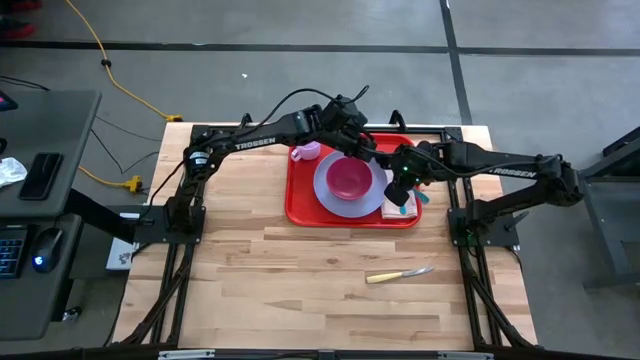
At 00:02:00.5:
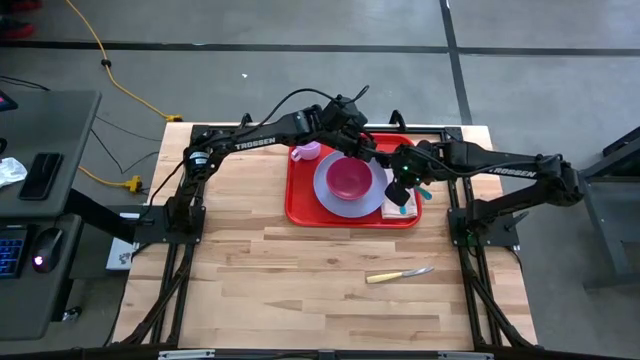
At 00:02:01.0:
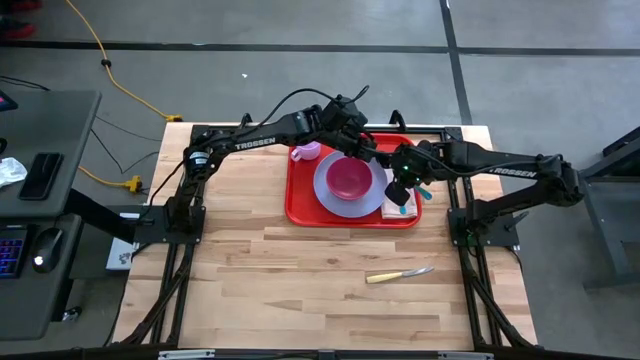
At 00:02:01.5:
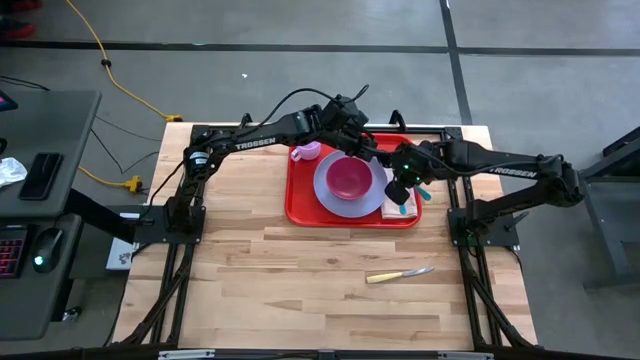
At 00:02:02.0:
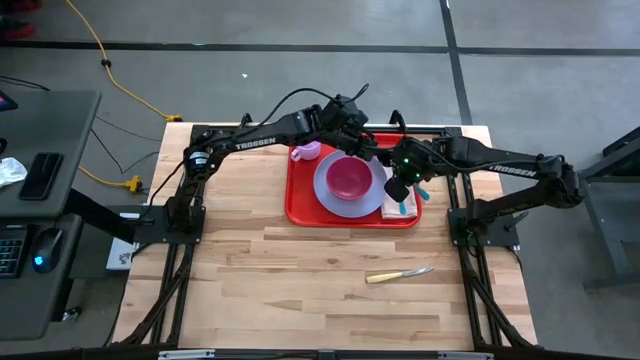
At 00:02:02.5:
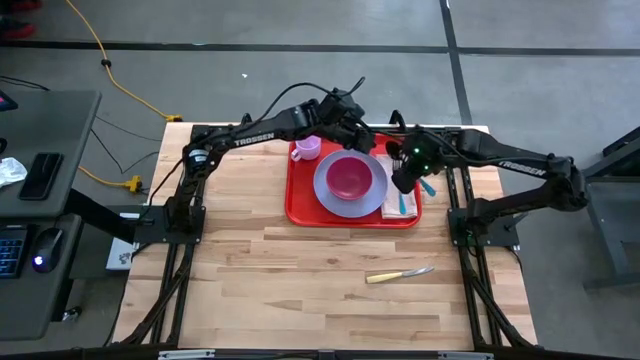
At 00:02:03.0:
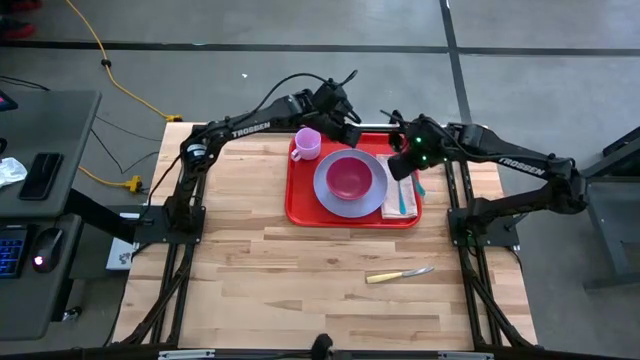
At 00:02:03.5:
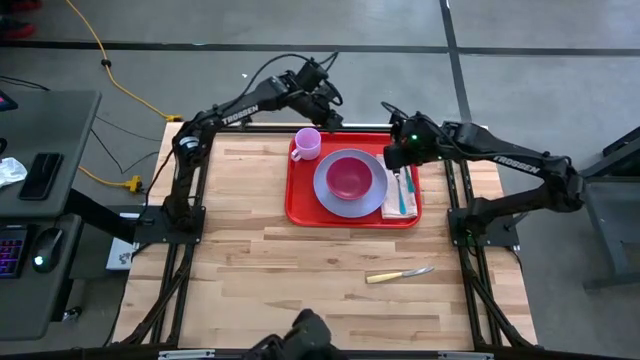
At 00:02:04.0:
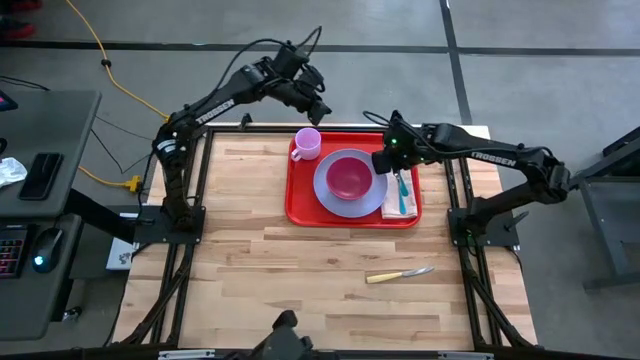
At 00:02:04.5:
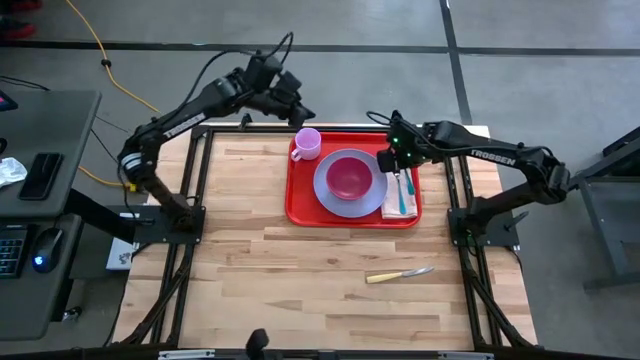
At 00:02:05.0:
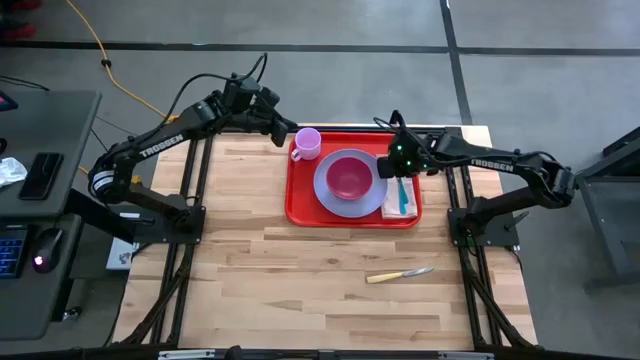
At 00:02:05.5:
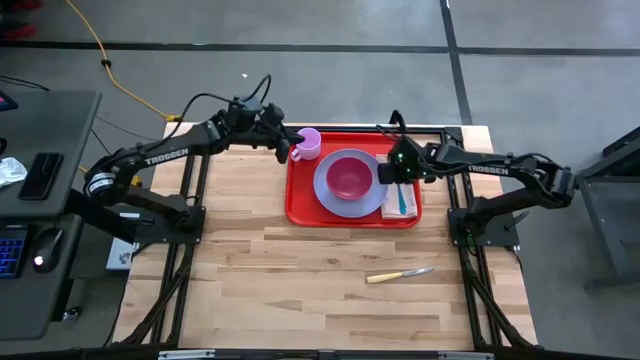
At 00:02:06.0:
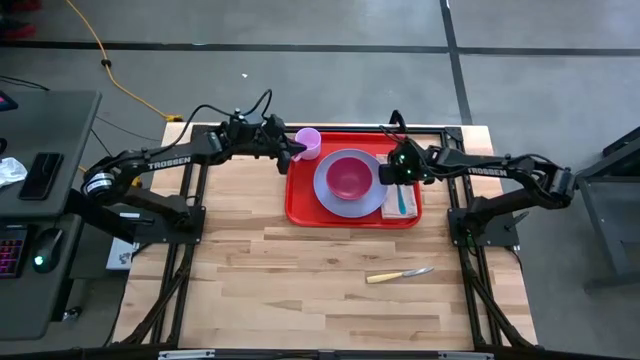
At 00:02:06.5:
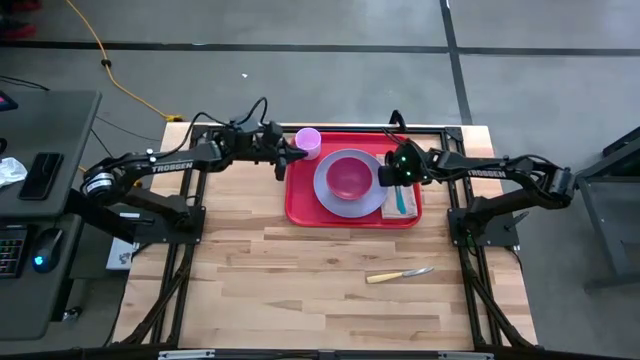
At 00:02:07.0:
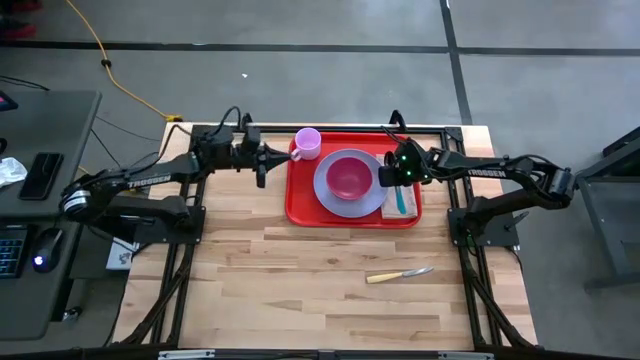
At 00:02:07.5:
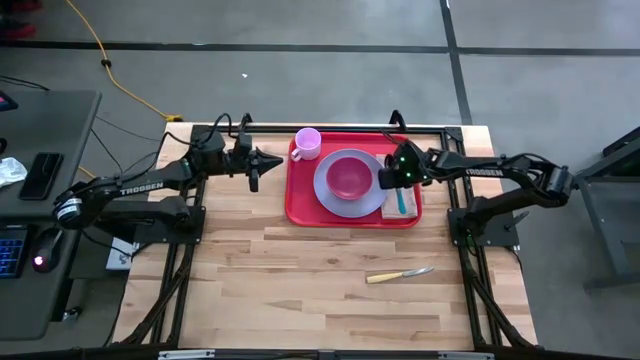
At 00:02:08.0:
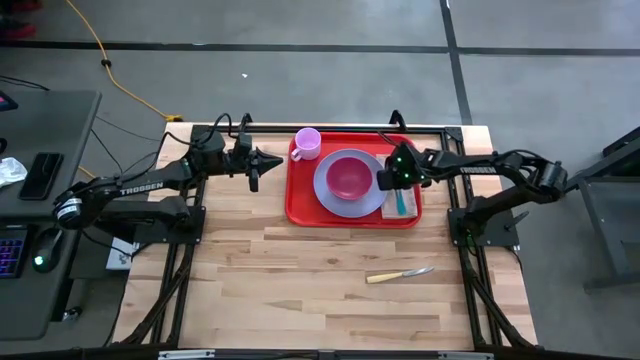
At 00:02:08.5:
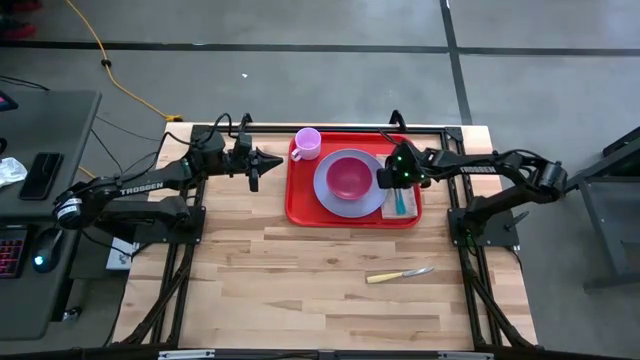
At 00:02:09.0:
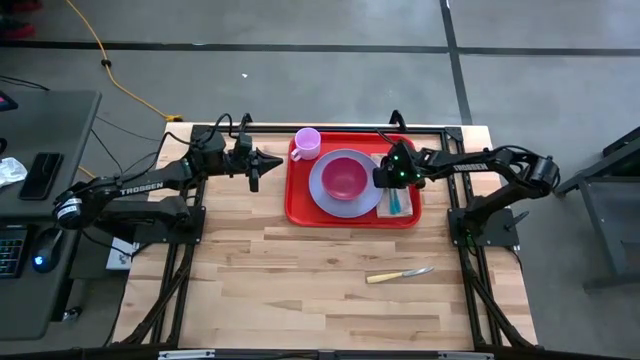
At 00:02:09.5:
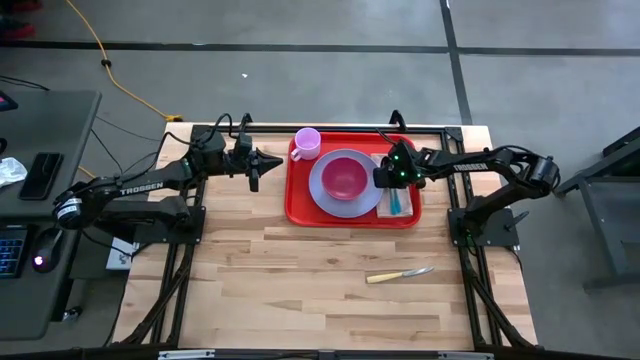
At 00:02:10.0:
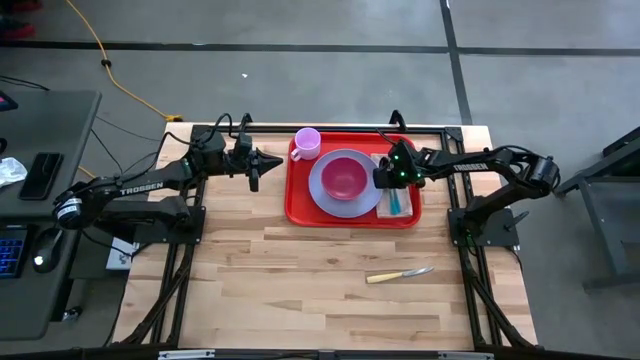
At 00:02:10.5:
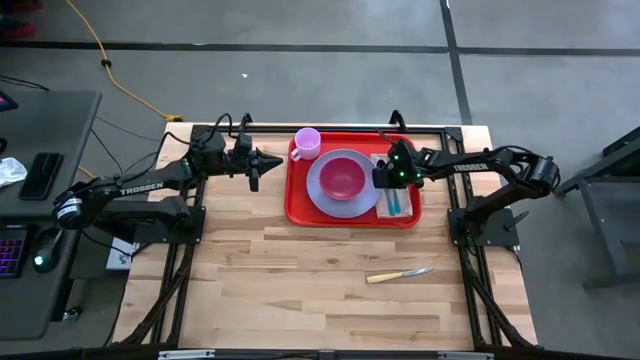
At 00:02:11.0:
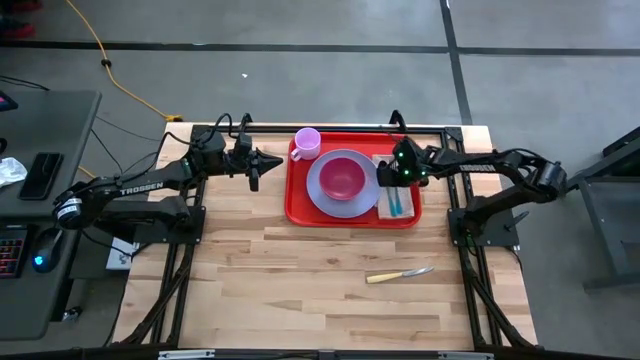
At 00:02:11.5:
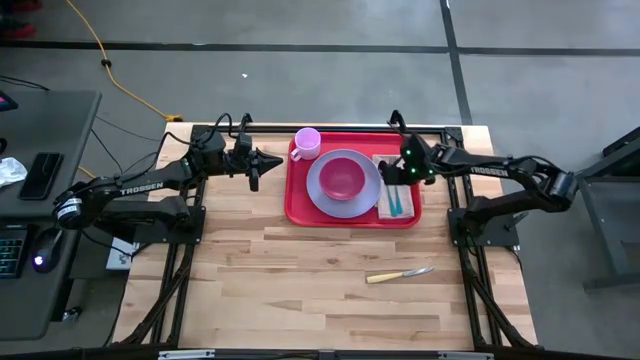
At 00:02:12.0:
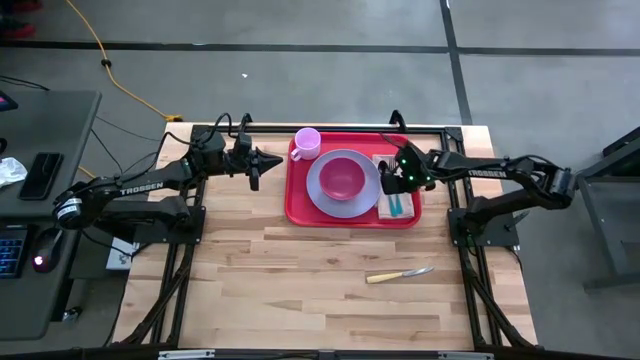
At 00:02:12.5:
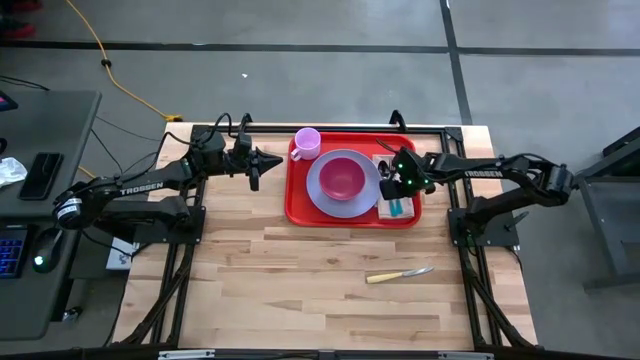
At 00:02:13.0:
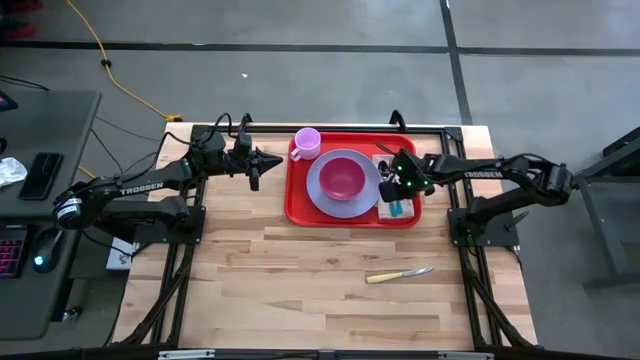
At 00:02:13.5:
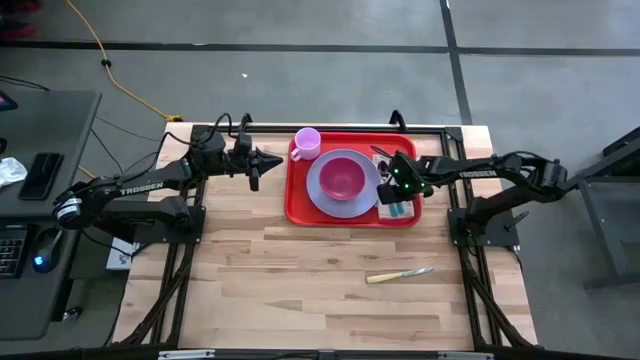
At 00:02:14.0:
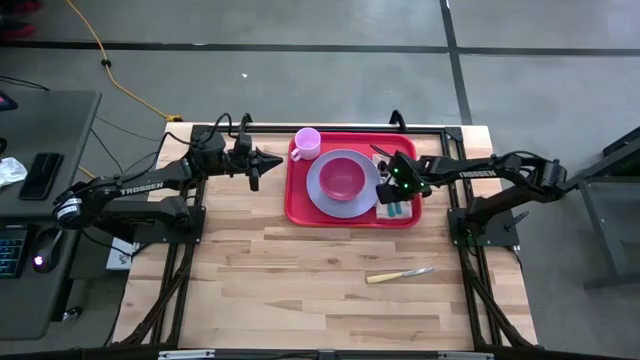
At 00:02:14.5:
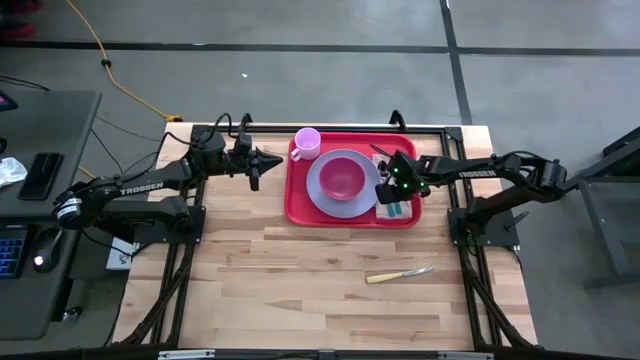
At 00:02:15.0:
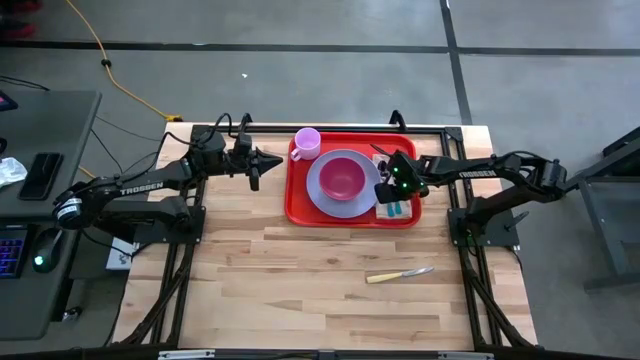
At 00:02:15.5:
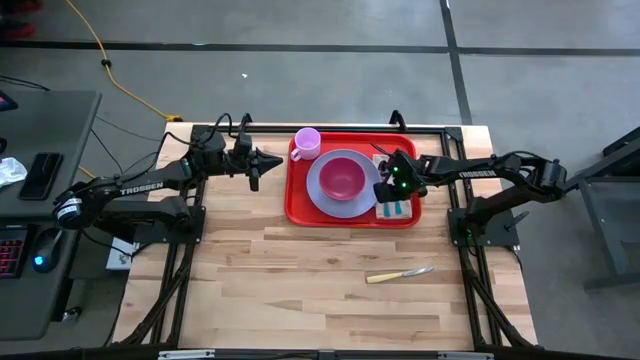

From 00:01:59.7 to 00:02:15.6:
Task: Set up tray
Put the blue spoon on the left of the blue fork on the white napkin on the red serving tray
